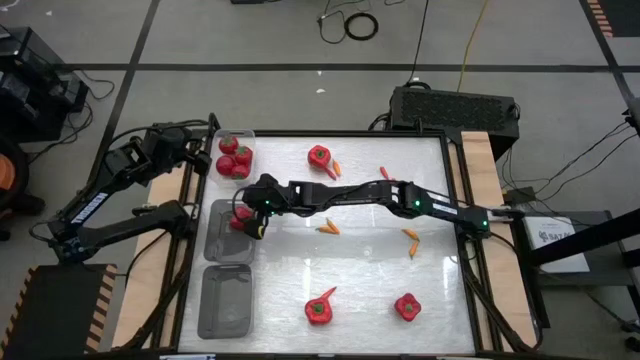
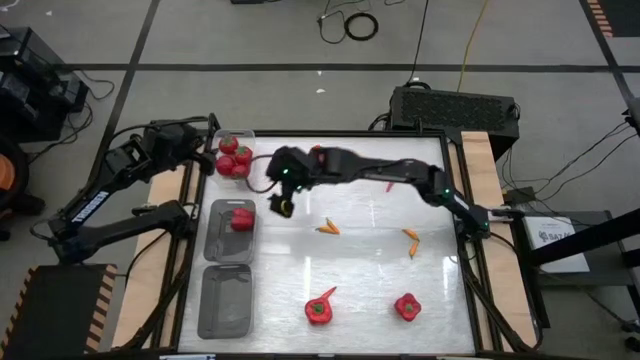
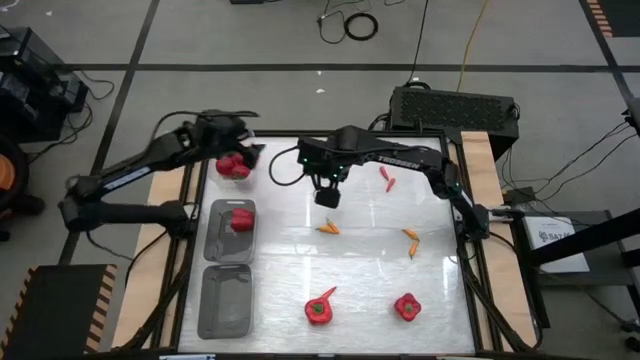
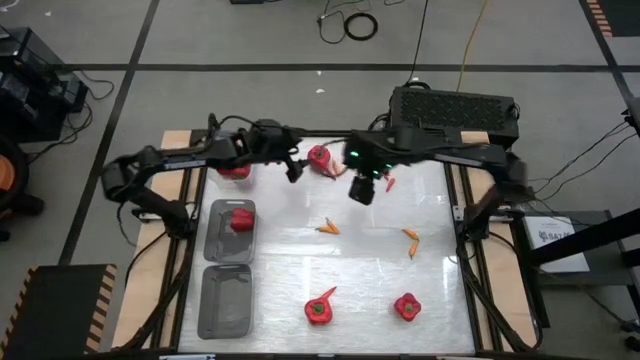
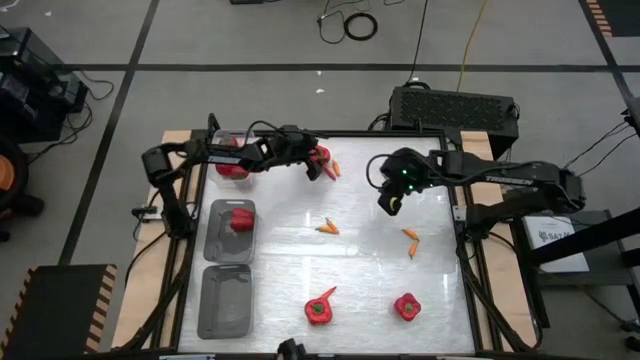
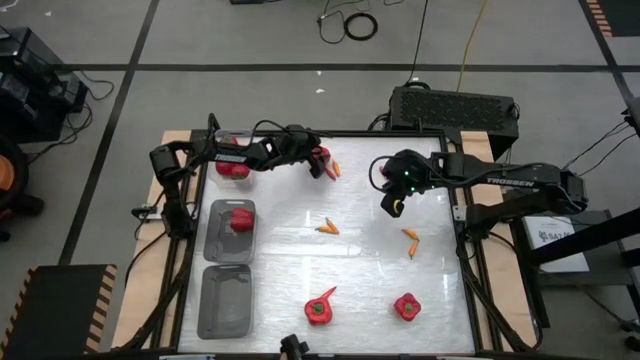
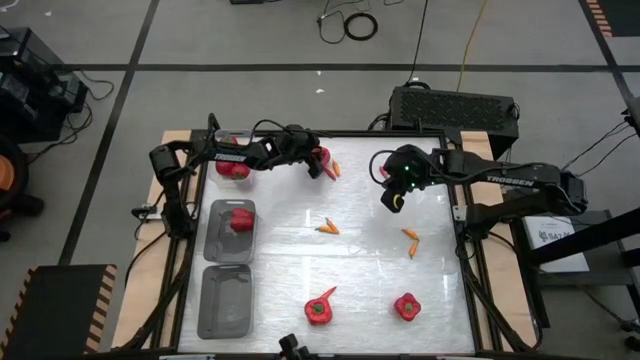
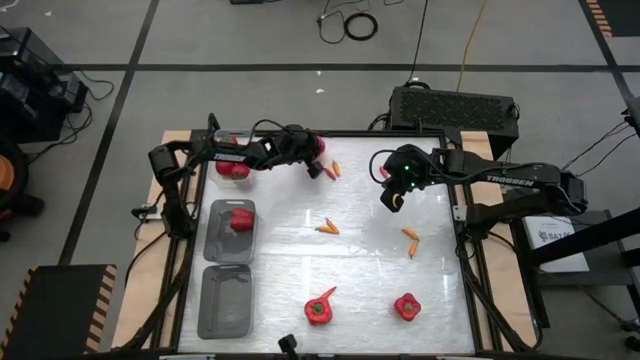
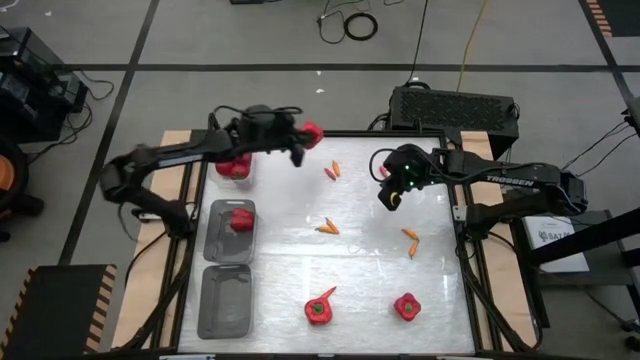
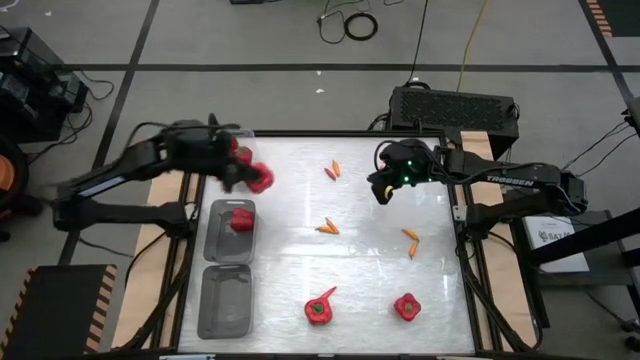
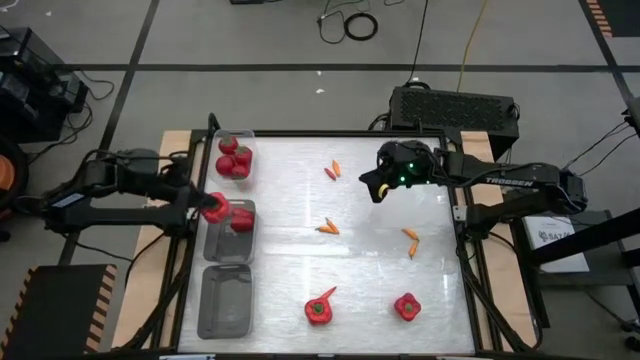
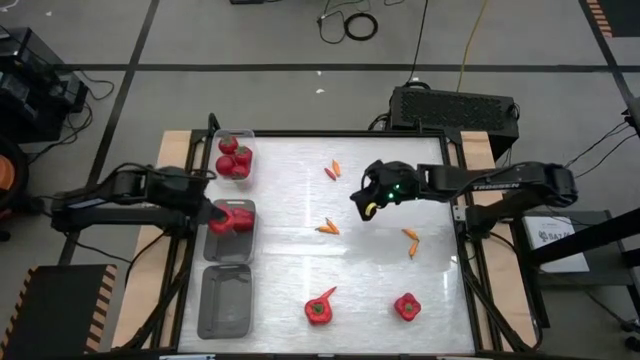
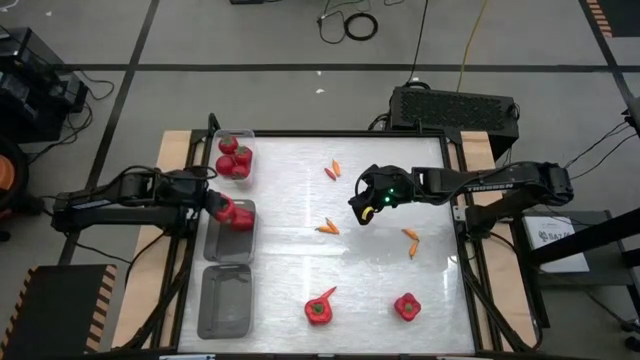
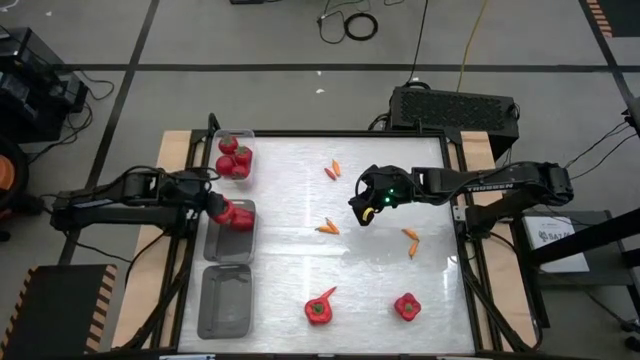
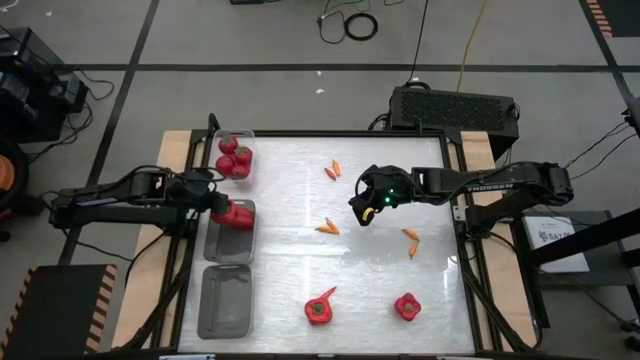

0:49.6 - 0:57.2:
Task: Sort produce into baskets
Put the red bell pepper into the top black bin

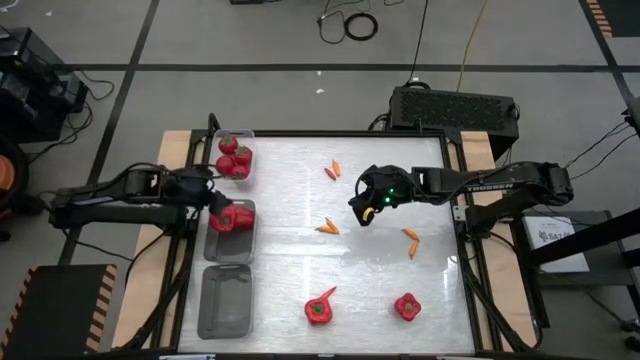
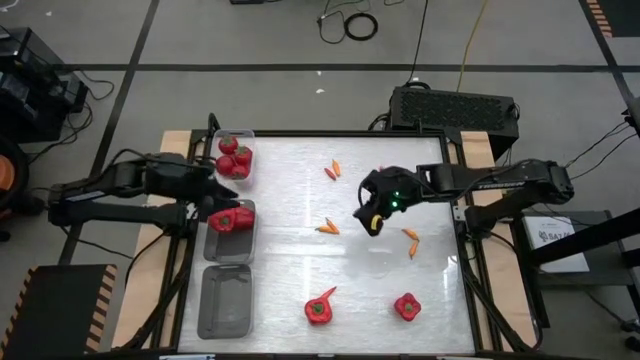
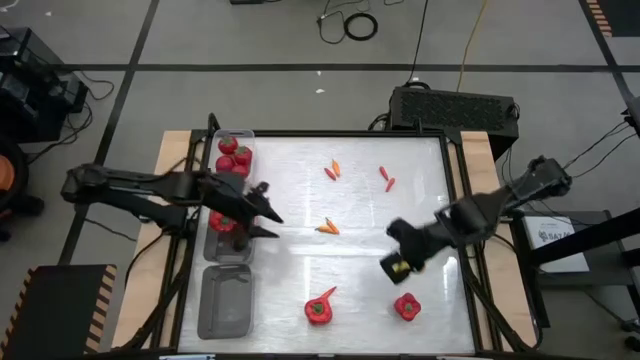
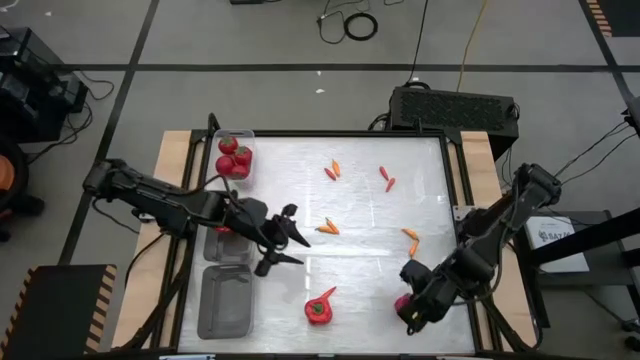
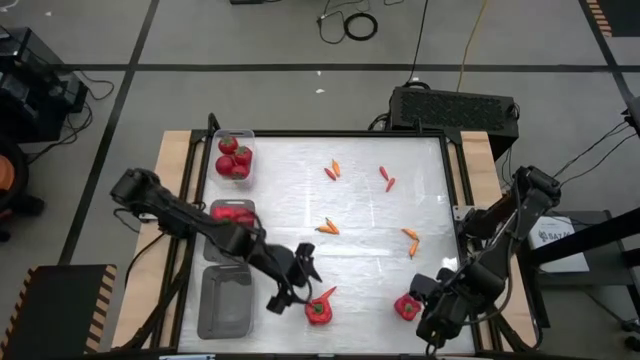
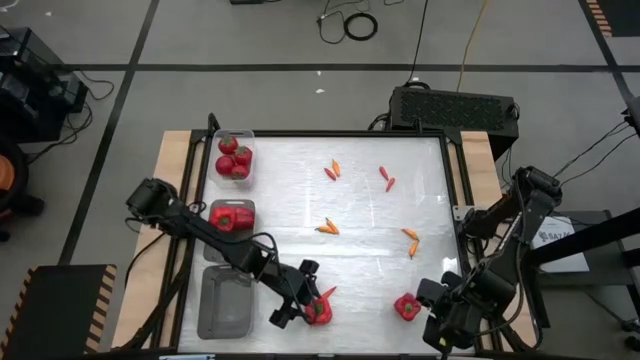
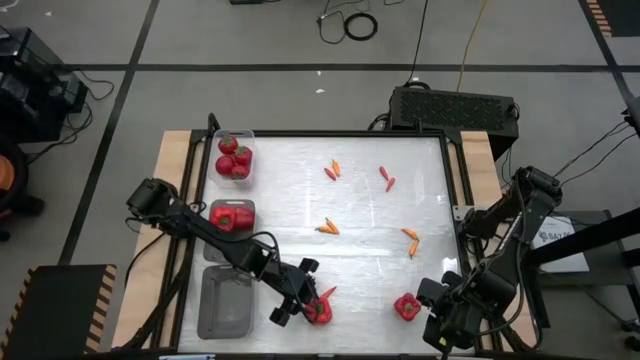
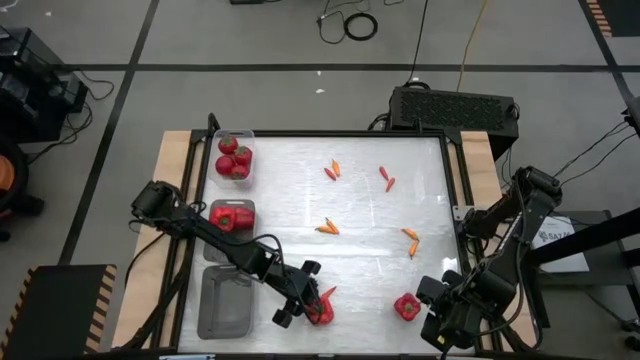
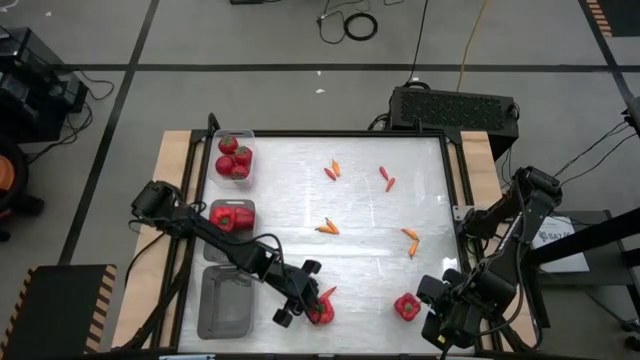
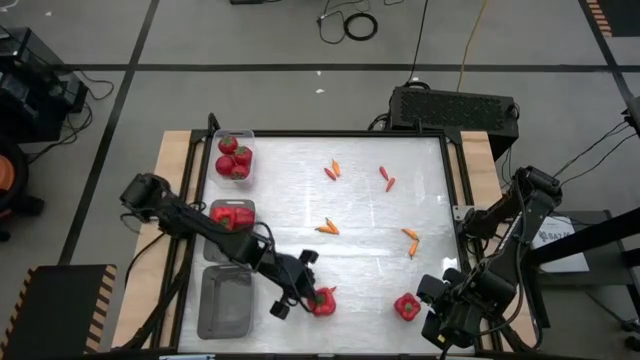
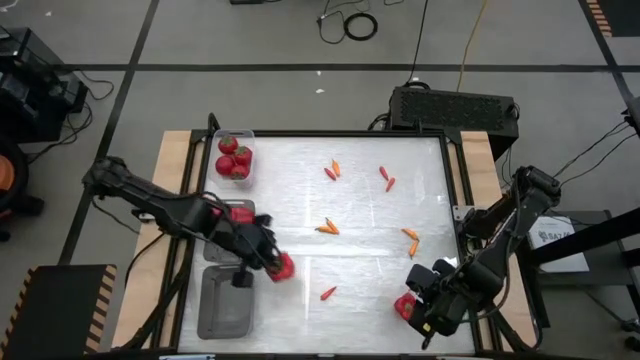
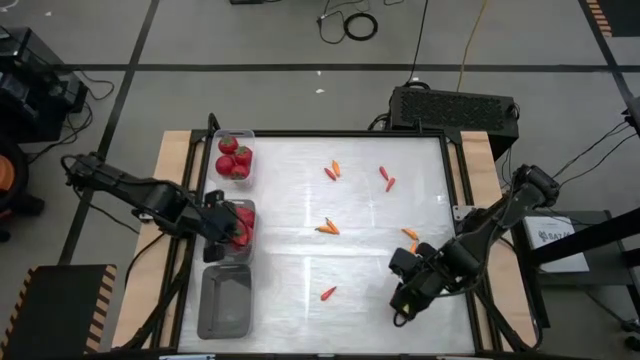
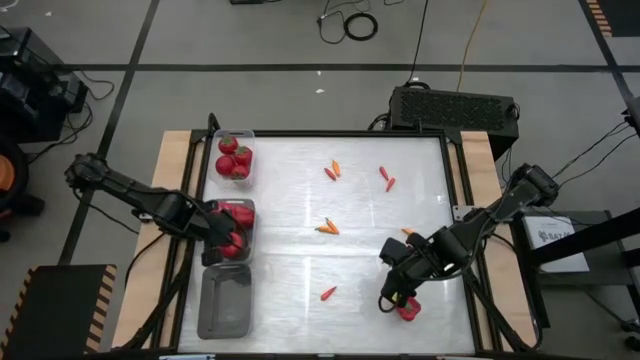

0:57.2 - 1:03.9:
Put the red bell pepper into the top black bin

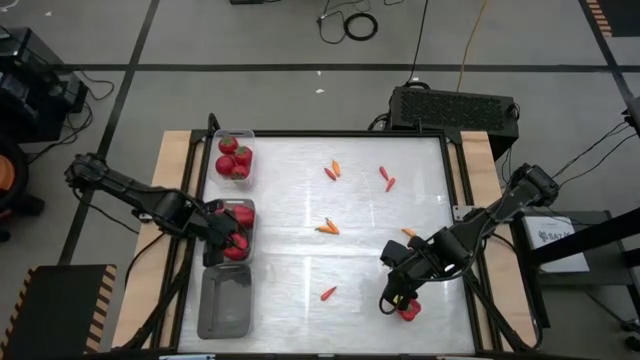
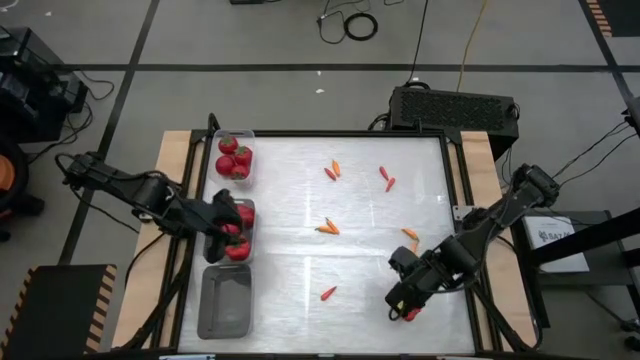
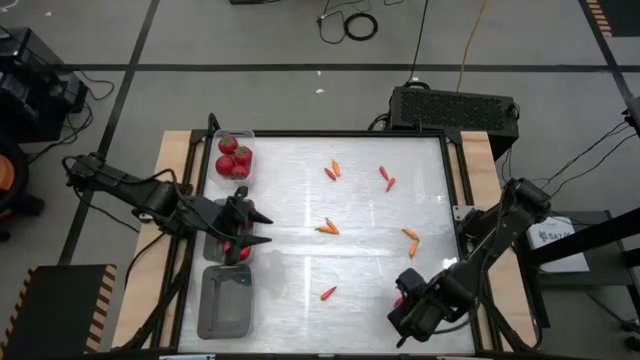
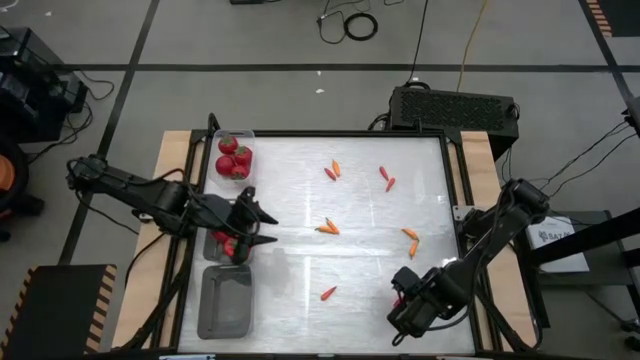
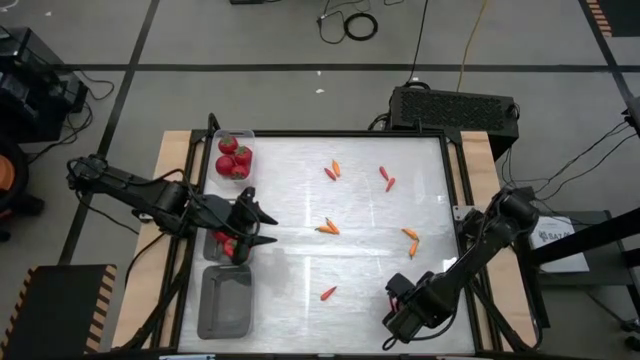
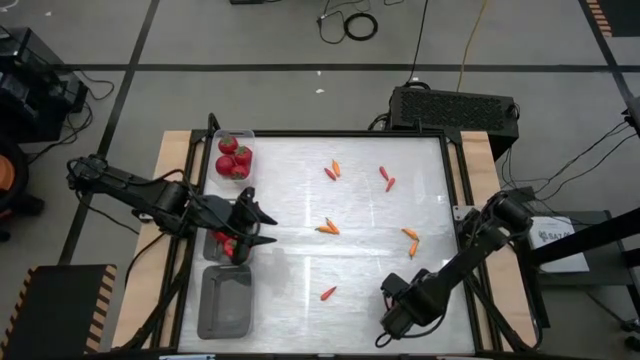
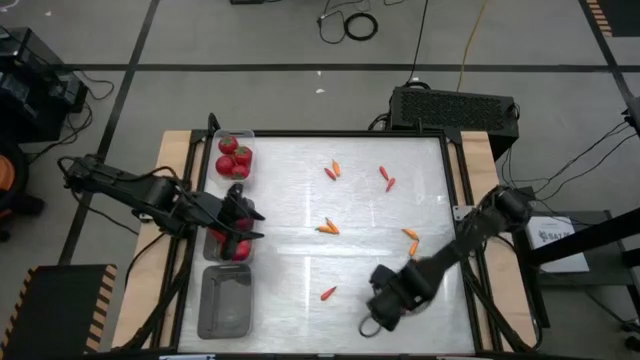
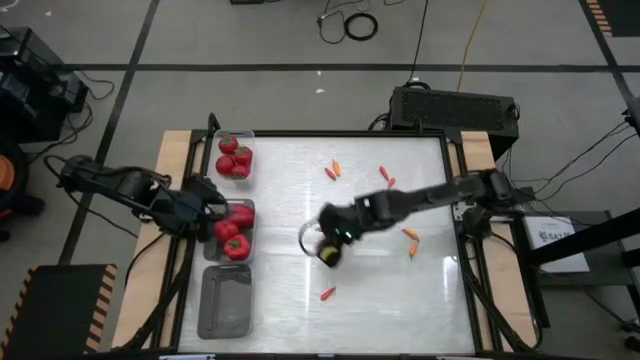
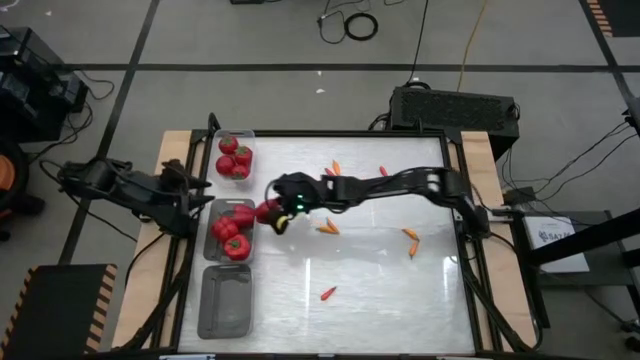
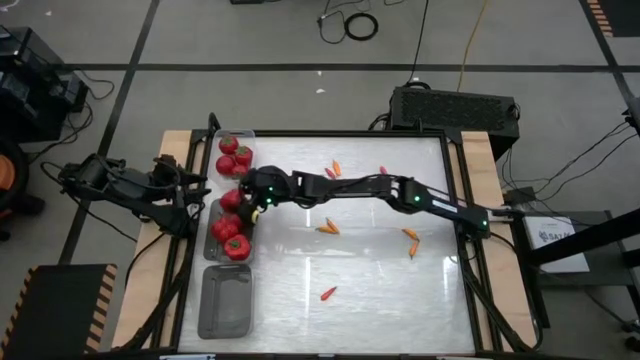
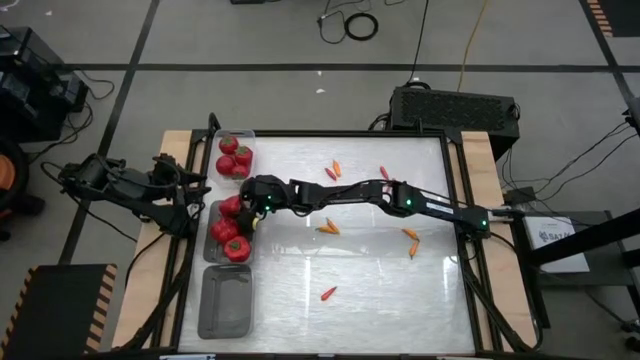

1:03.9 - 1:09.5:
Put the red bell pepper into the top black bin

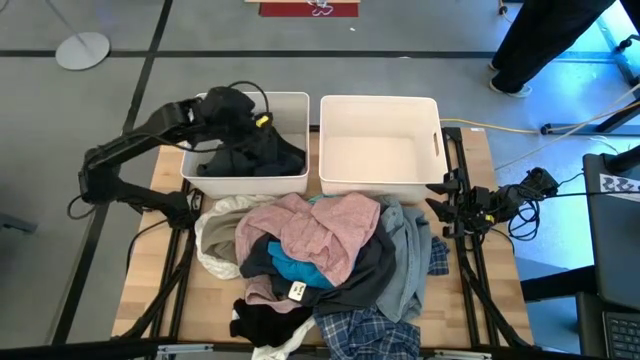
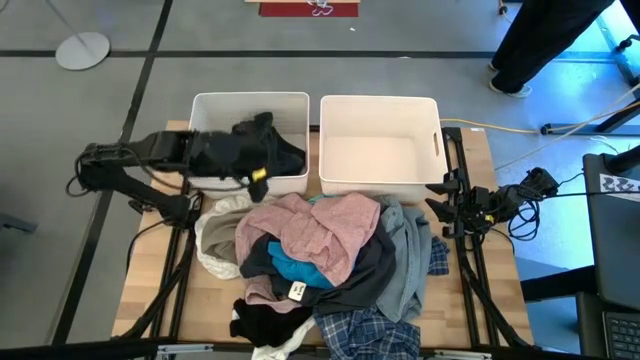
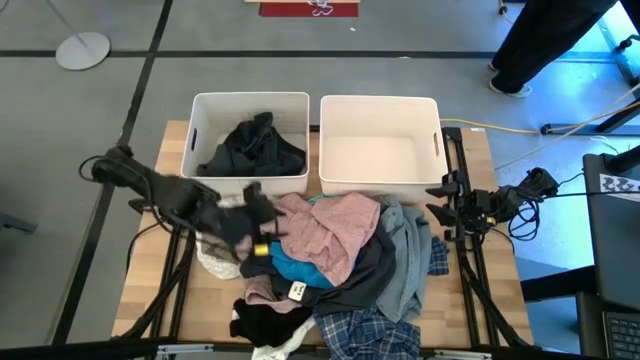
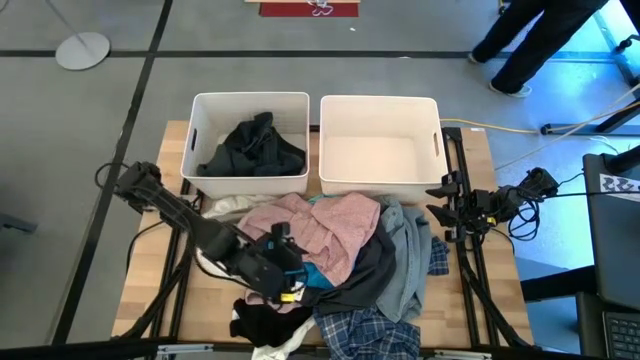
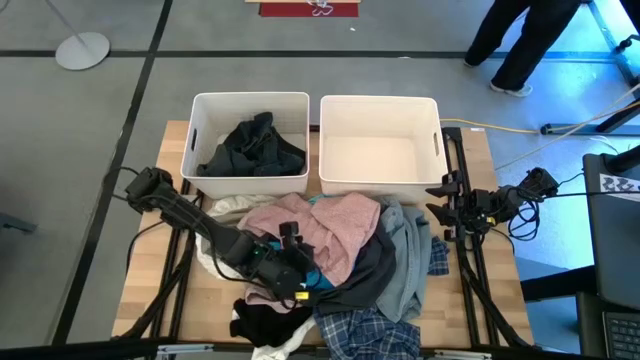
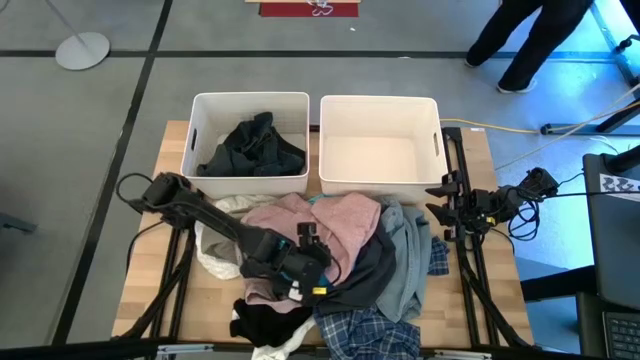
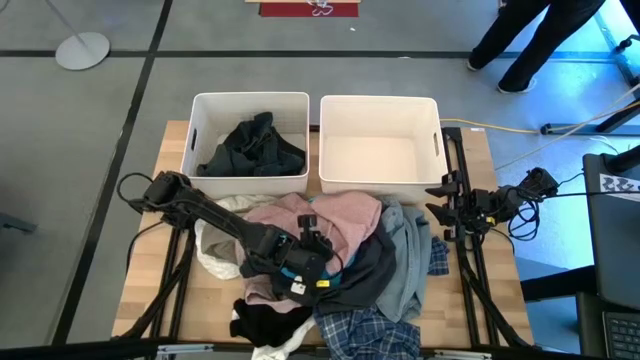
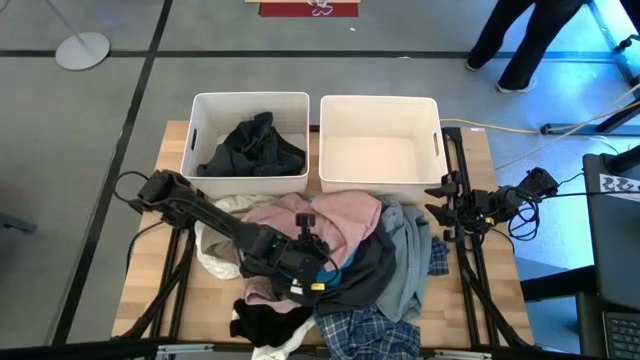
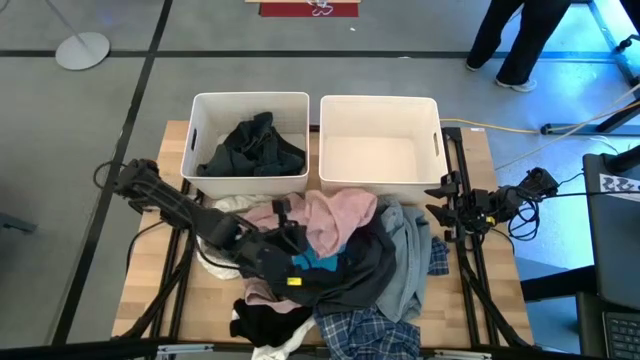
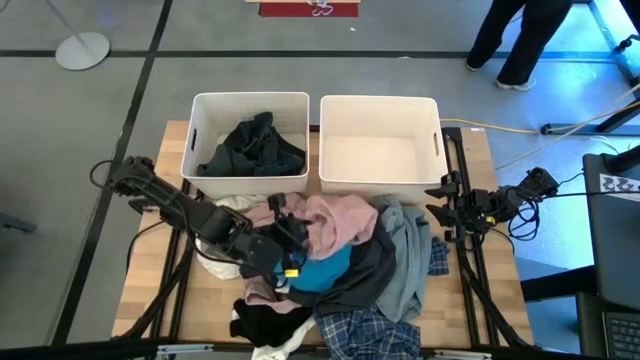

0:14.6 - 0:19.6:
Task: Sort clothes
Put the pink shirt into the left white bin
